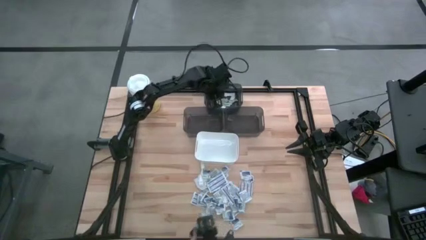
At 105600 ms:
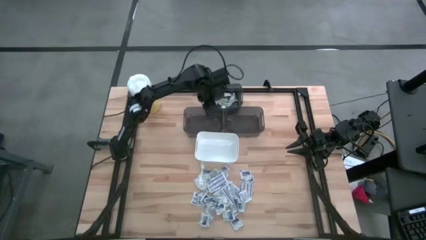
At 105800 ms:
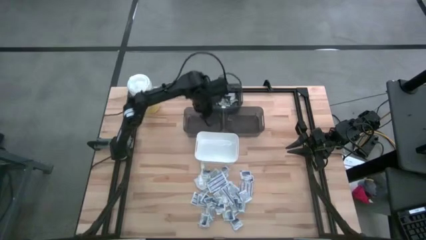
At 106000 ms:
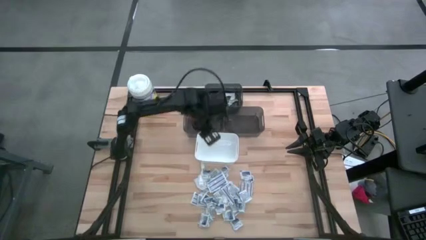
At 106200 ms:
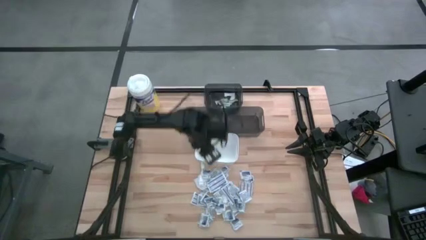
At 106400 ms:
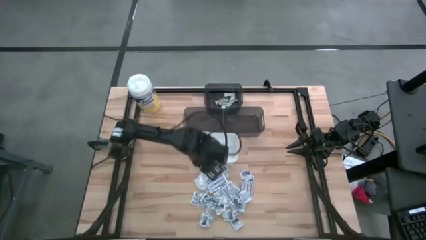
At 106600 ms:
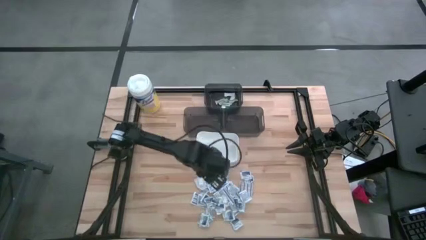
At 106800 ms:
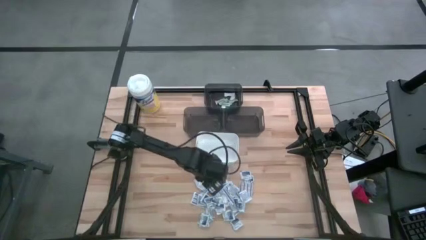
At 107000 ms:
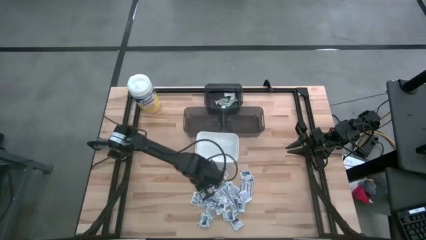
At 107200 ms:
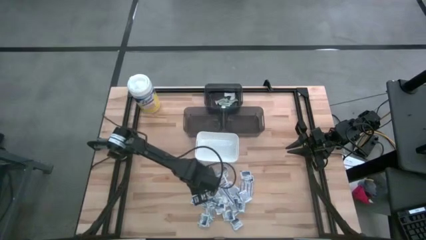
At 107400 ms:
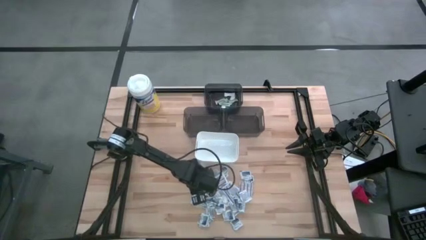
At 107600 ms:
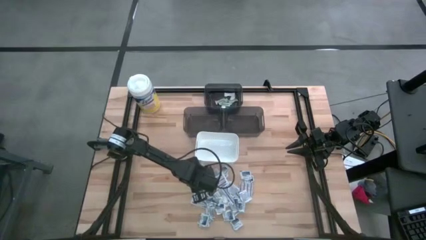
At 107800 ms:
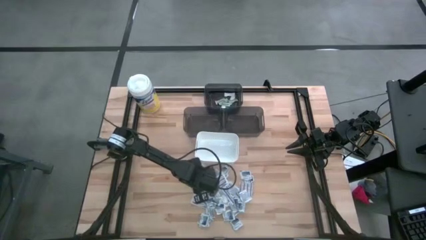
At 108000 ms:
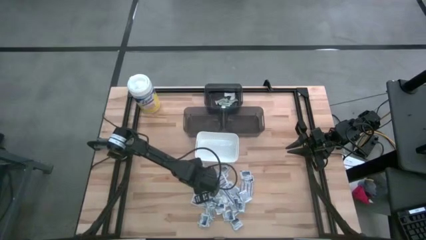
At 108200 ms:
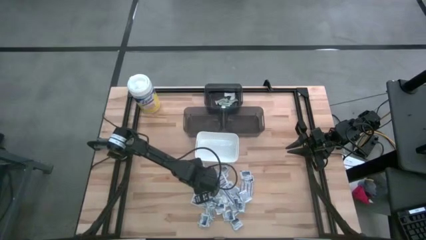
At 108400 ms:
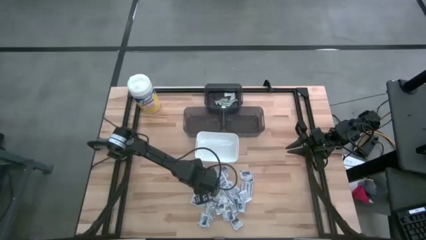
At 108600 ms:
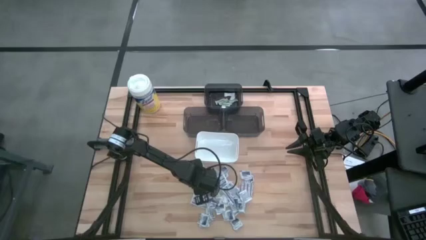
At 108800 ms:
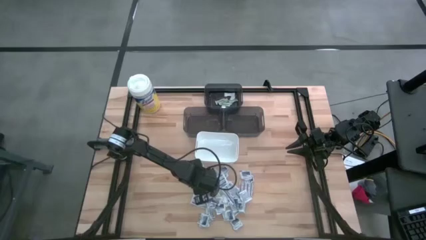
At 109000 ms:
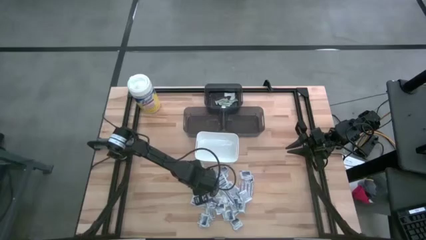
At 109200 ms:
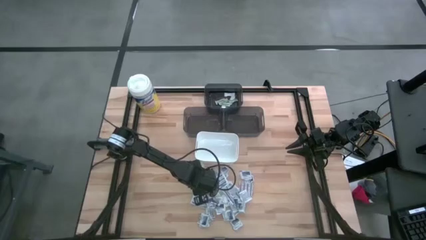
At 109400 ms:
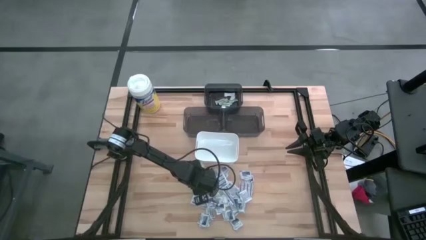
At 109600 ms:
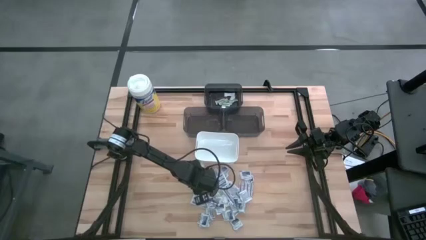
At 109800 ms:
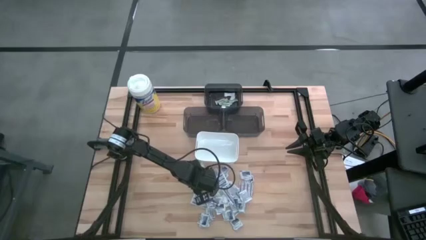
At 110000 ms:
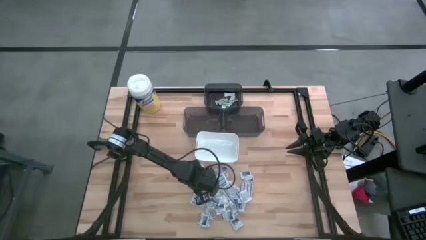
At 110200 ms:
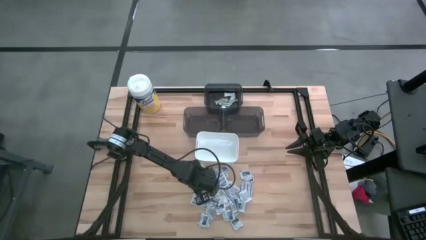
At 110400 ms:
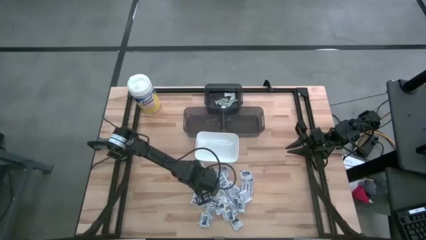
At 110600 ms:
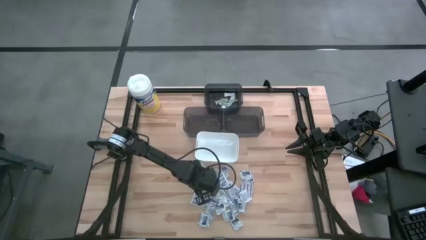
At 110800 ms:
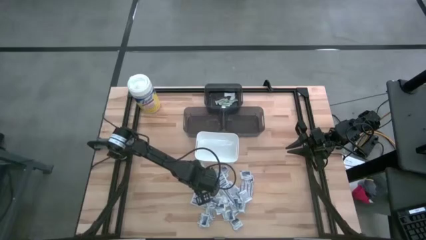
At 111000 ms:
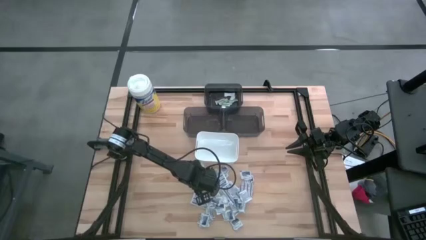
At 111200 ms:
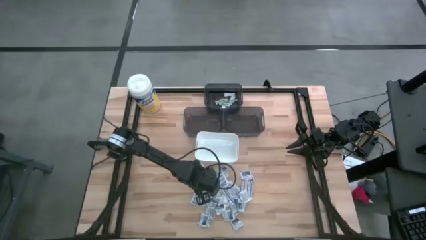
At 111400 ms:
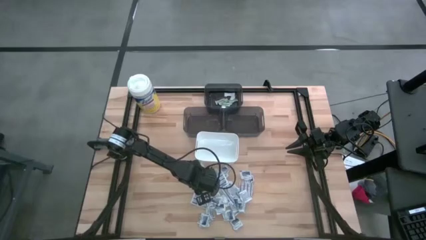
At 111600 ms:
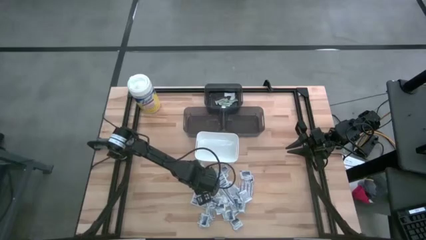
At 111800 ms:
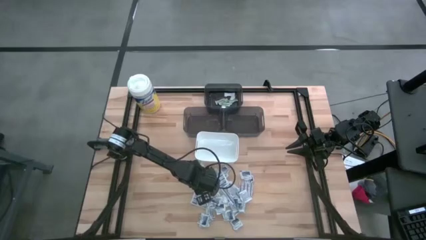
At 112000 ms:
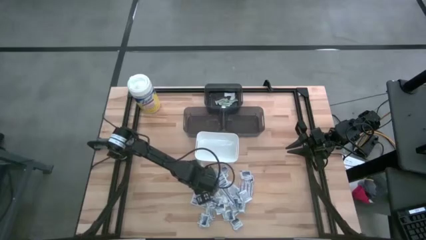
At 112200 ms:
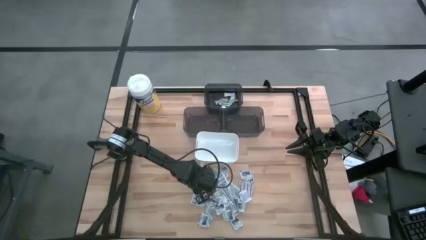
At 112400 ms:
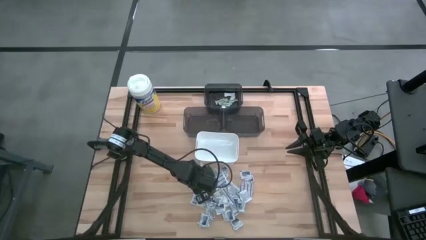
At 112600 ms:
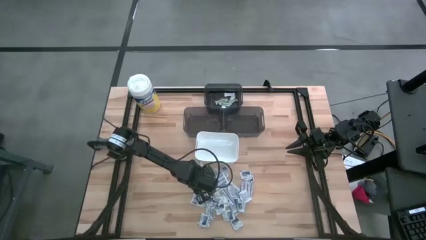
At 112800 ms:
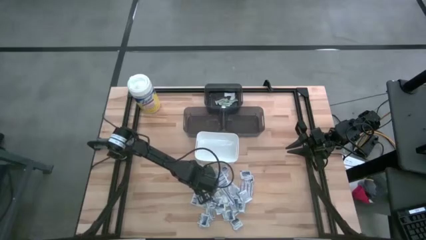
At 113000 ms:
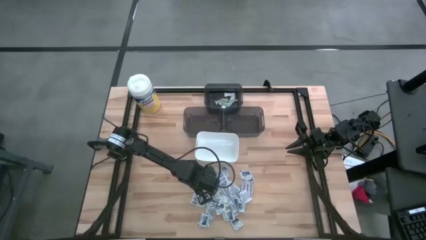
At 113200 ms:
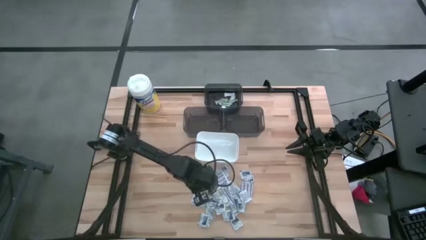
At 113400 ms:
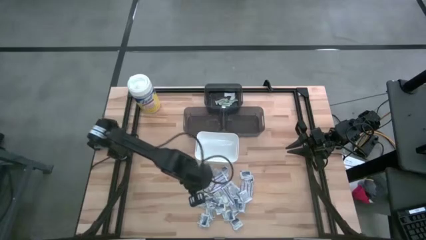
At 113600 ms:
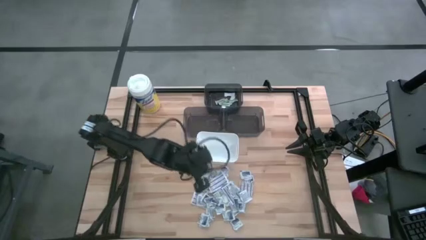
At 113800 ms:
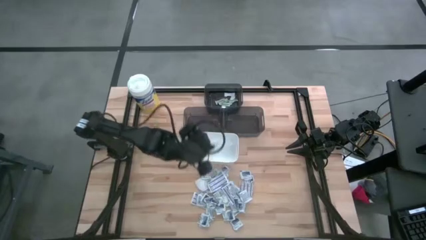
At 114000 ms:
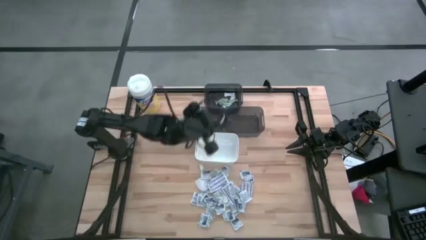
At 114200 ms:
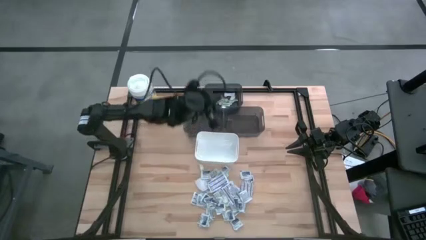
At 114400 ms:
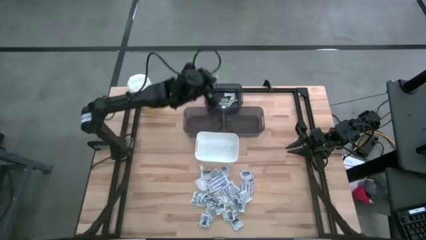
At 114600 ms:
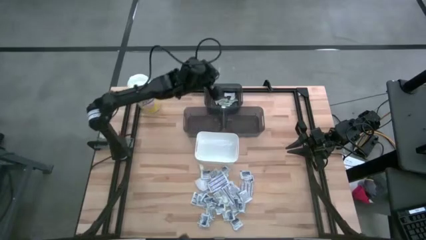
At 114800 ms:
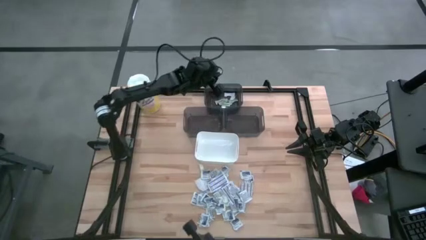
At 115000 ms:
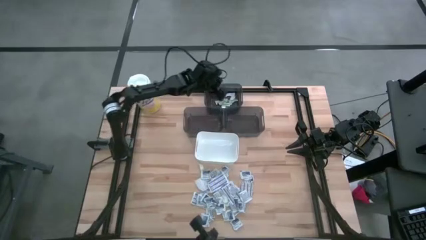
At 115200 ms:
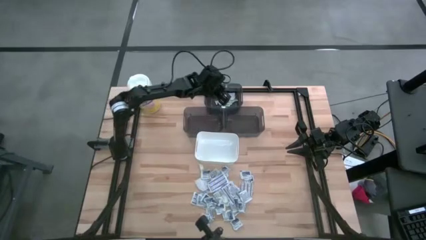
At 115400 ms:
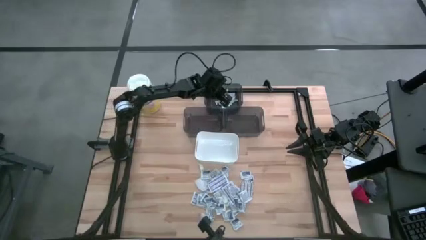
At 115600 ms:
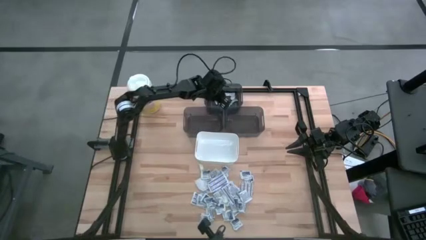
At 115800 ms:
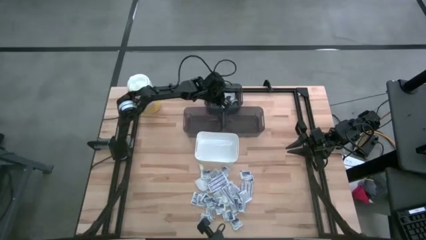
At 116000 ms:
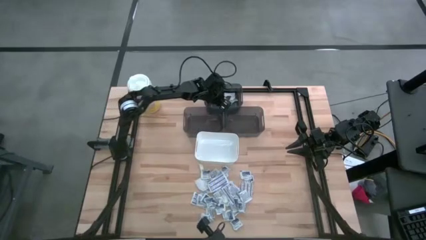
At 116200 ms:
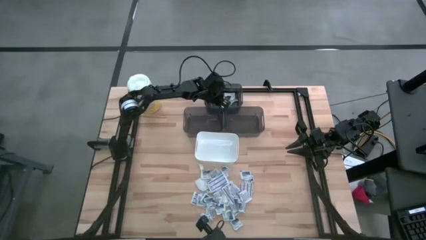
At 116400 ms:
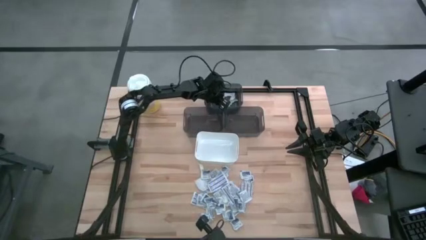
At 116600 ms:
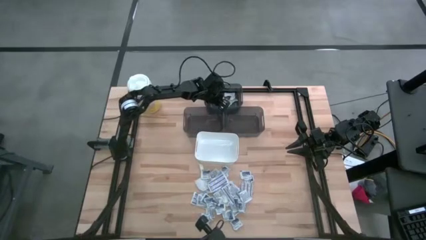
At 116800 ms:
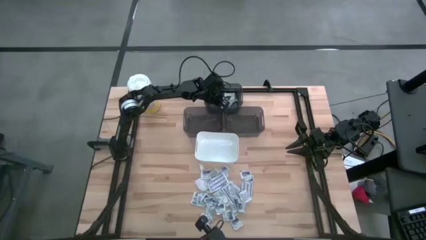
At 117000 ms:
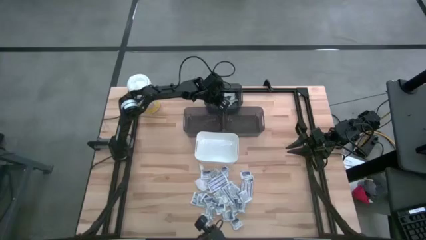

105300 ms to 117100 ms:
Task: Pick & Place First Aid Supplies
Put the green bandage into the top black bin

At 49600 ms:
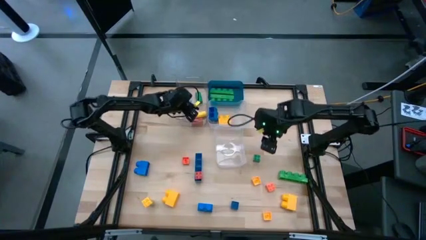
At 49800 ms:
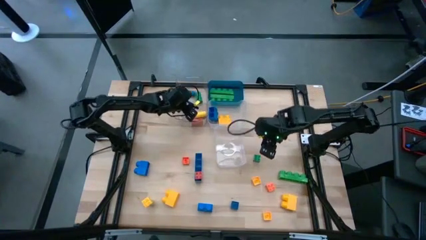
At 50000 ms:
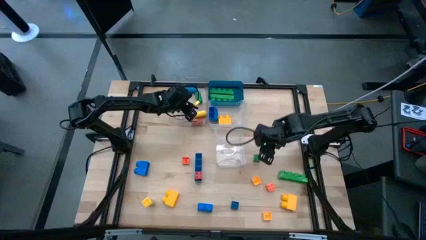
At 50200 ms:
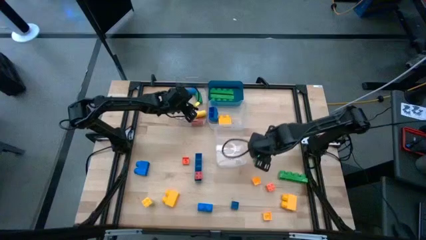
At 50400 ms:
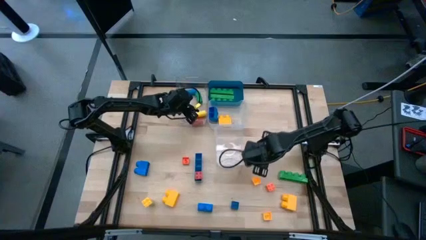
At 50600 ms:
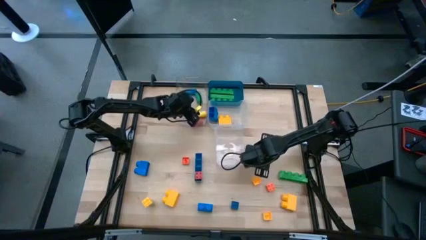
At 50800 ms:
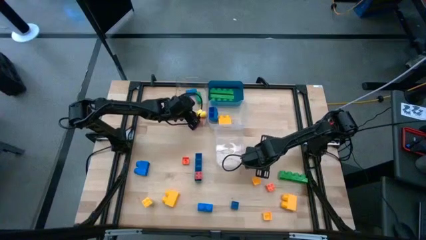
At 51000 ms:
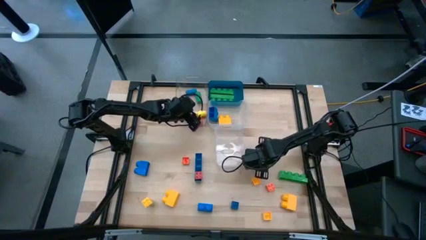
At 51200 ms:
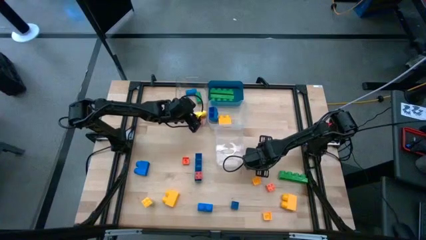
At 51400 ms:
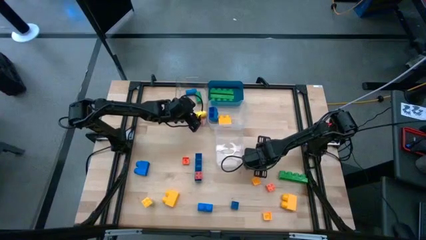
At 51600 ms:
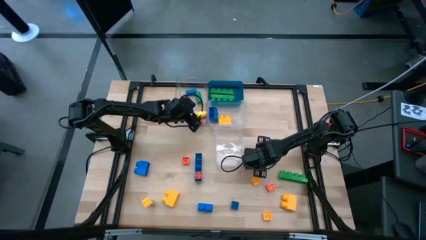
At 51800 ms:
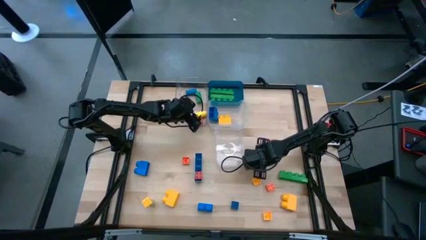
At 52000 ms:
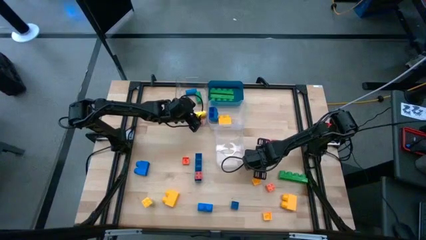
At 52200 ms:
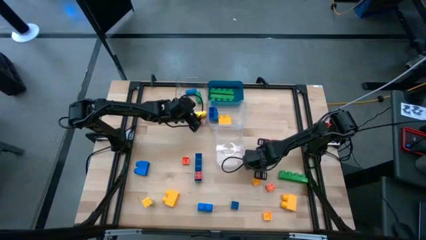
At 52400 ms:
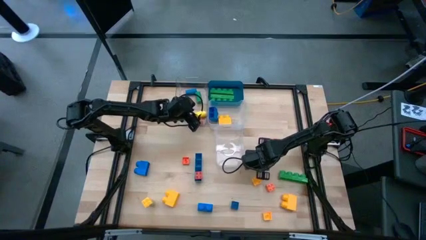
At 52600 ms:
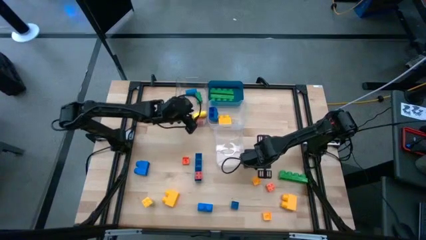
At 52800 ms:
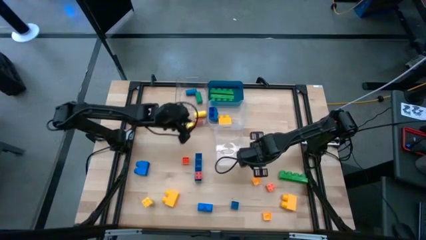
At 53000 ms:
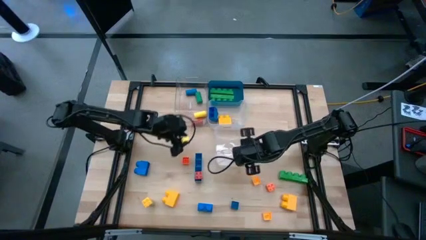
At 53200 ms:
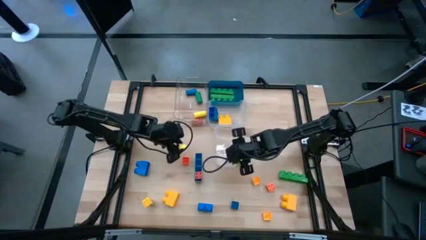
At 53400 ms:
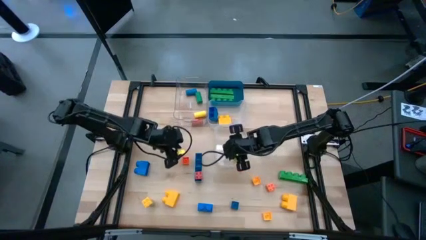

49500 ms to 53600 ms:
Task: Sort blocks by size
Put the green 4 stud small game piece into the bottom transparent bin

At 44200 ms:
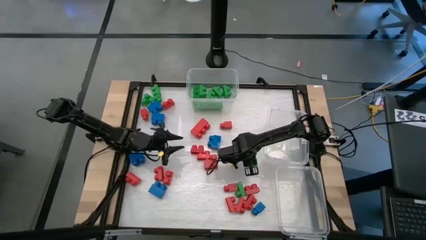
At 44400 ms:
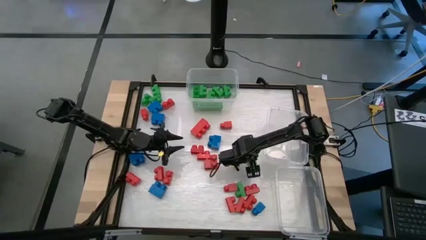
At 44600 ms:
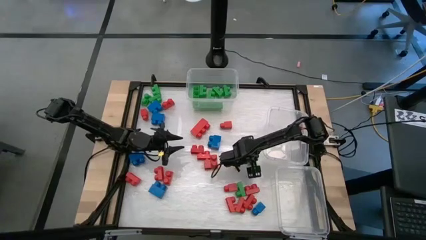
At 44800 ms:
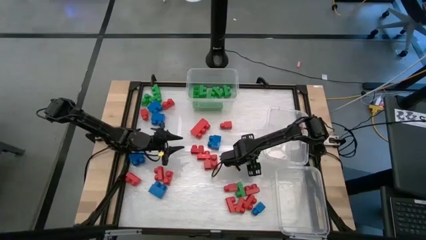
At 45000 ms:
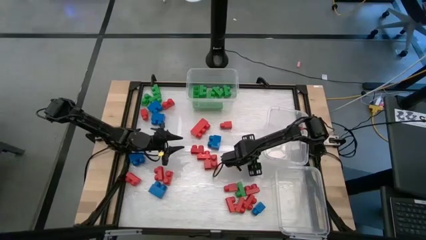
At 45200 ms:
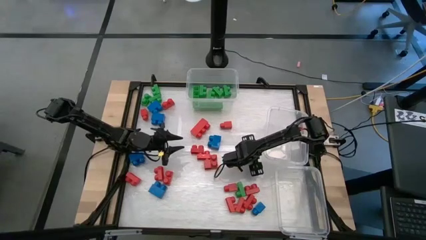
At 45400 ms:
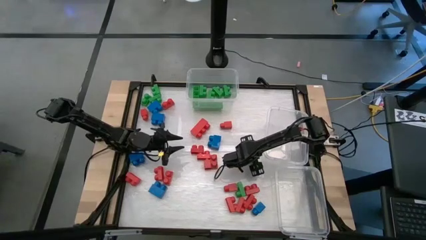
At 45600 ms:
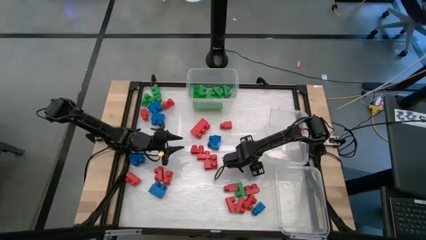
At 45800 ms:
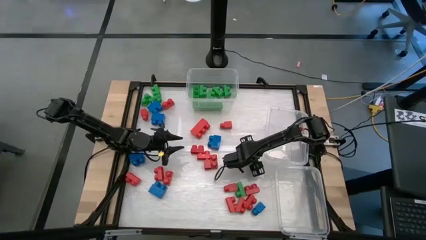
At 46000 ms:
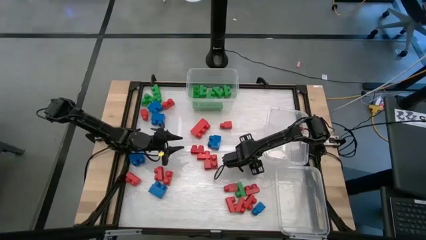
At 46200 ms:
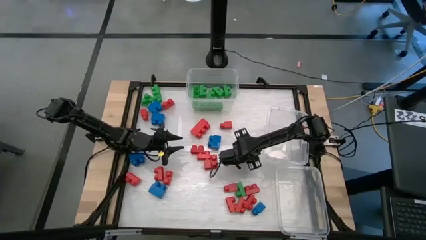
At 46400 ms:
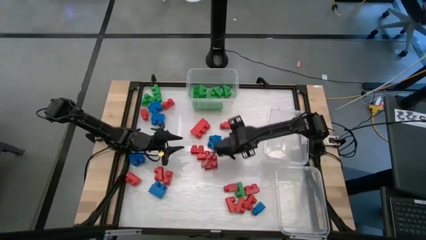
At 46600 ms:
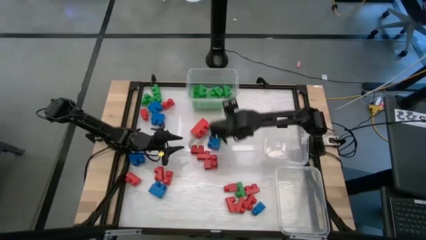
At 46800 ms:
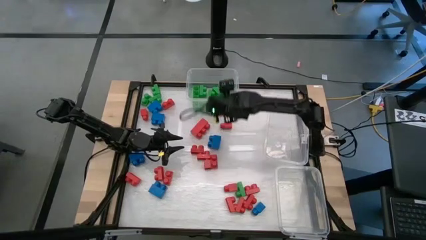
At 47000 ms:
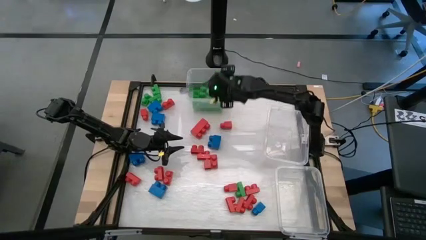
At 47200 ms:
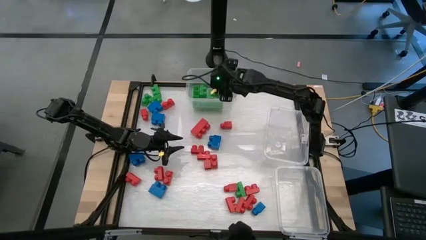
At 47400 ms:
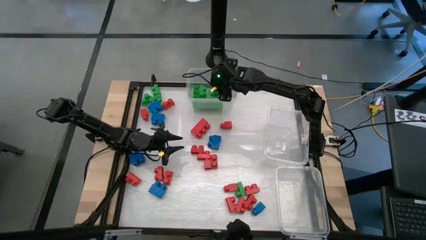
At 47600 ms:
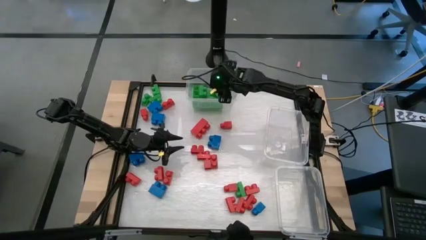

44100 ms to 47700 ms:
Task: Sort blocks
Put the green game piece into the top transparent bin
